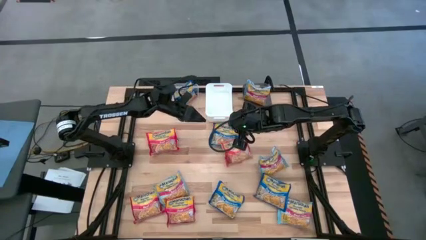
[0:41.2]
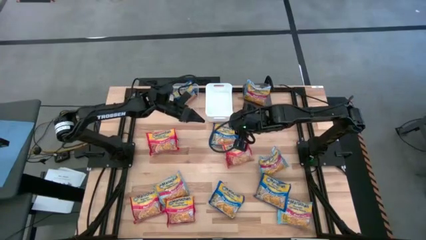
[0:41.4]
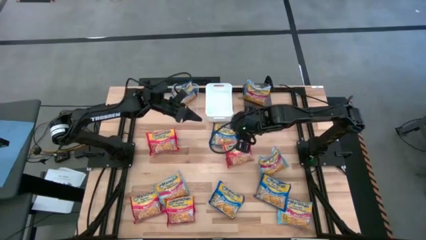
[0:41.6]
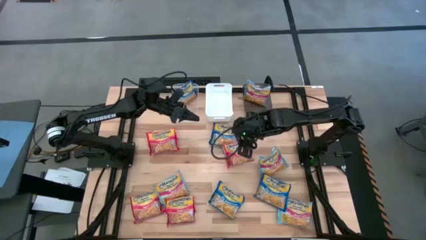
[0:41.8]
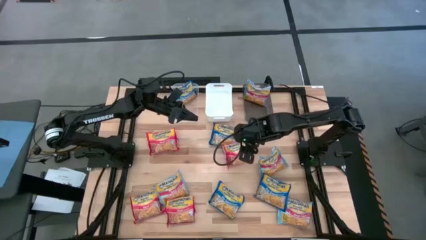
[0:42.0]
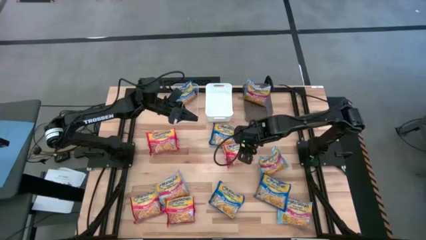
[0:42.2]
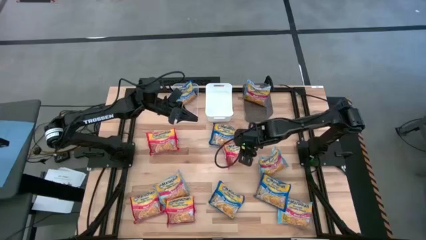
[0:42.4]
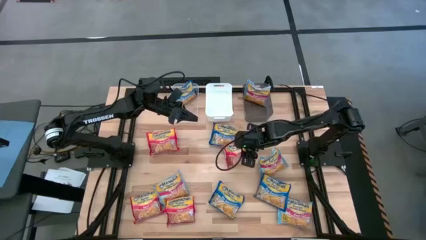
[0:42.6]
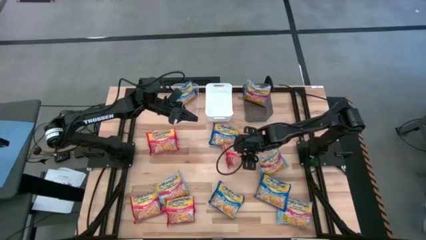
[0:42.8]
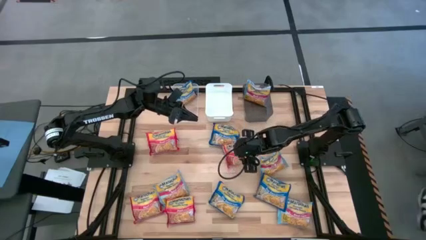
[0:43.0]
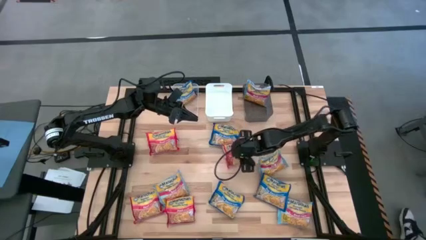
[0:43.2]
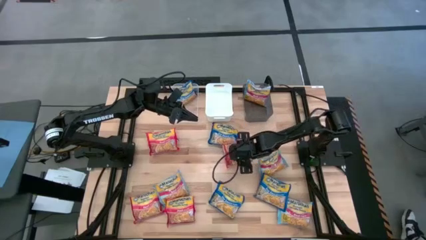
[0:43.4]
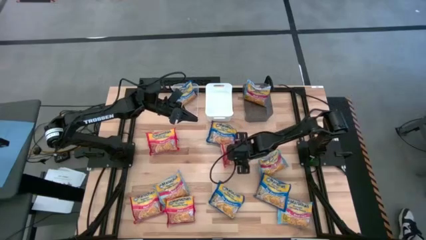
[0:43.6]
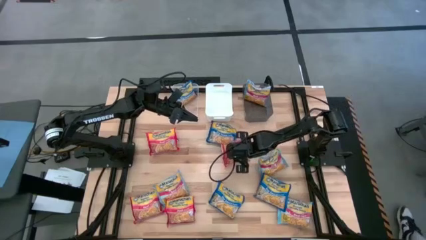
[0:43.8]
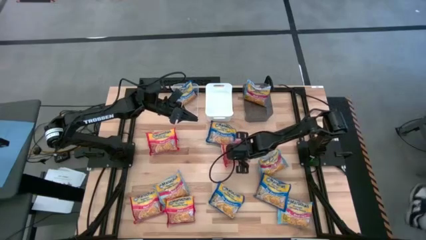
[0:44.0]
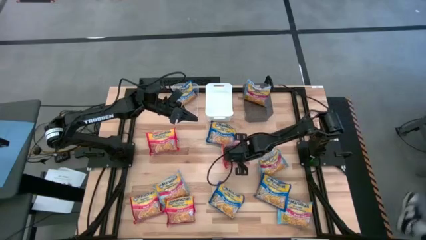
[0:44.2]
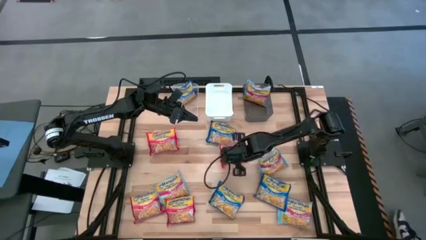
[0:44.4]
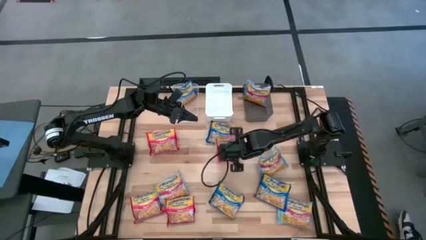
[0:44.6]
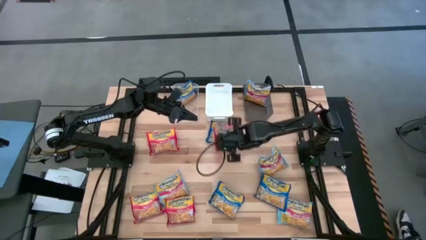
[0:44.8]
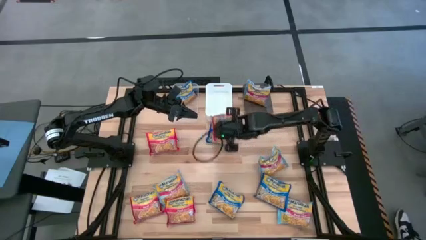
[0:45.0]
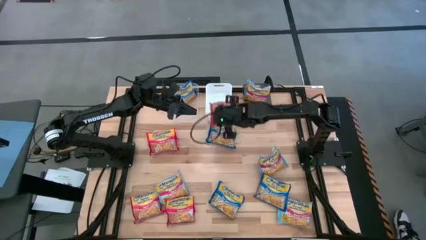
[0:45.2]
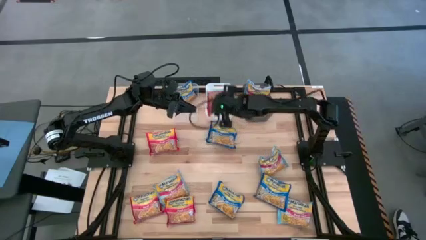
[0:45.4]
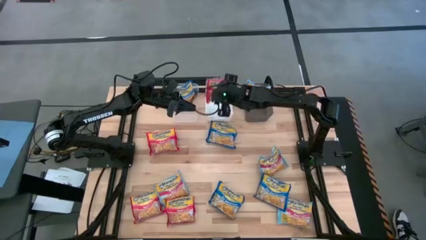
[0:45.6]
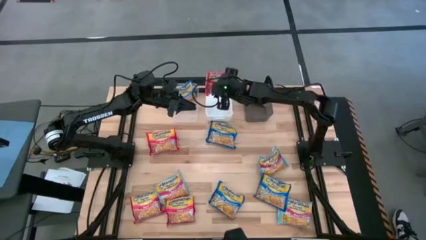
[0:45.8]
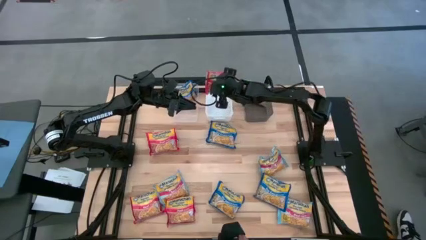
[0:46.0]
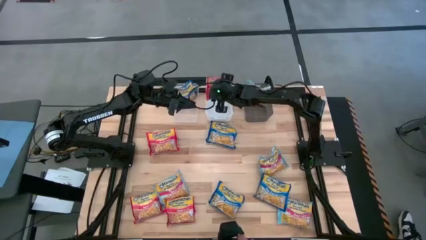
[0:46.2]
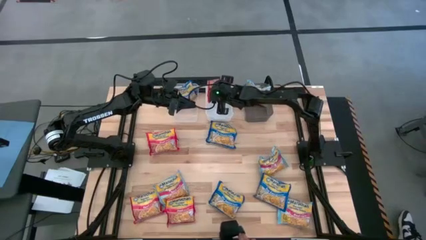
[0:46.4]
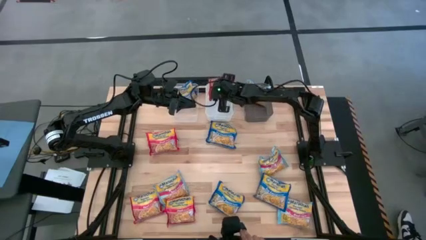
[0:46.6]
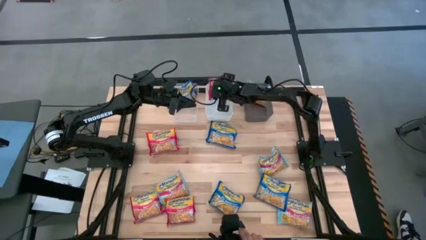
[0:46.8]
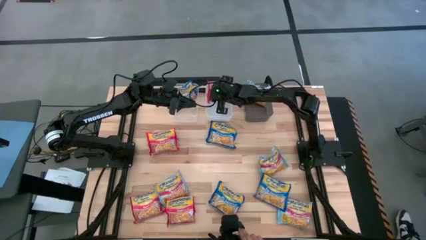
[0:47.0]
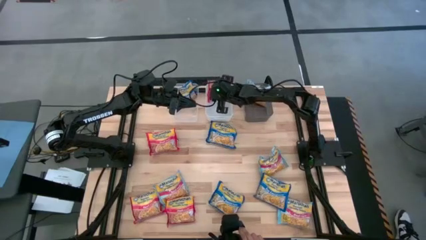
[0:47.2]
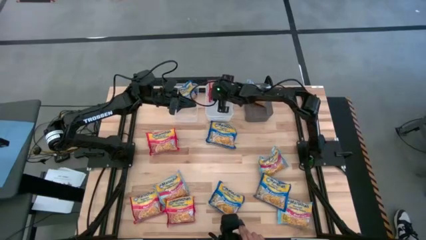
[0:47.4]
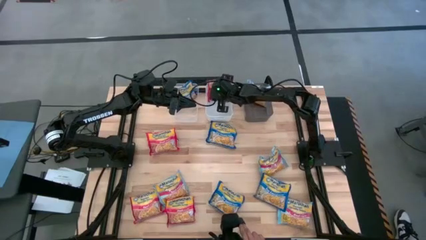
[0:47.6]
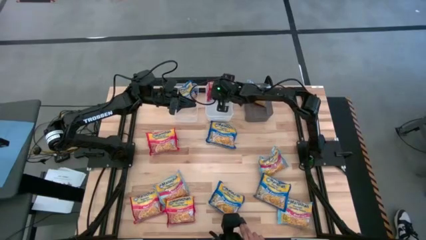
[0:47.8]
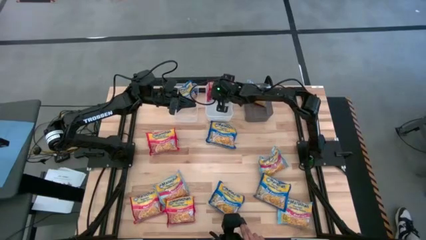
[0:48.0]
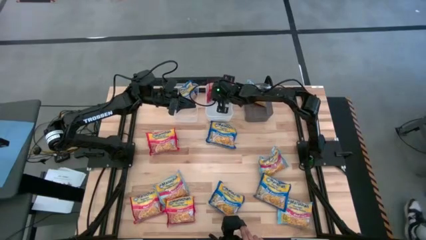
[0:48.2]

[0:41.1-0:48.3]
Task: Sort Maruchan noodles
Put the red noodle pack into the white bin

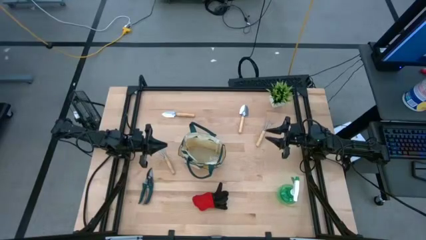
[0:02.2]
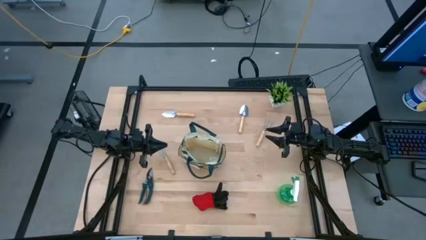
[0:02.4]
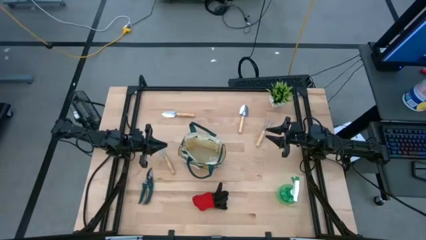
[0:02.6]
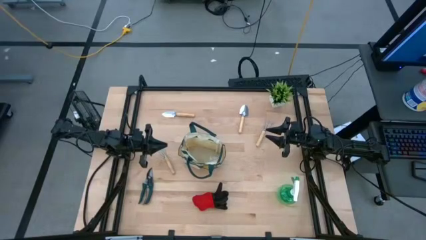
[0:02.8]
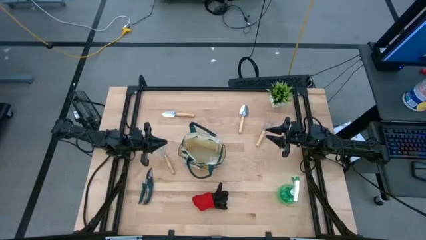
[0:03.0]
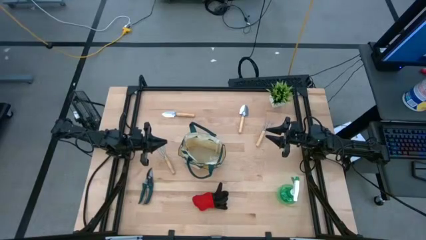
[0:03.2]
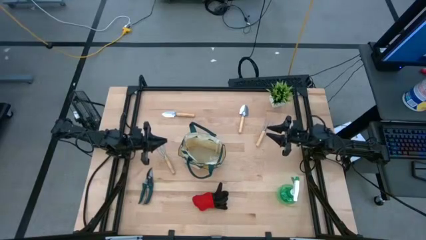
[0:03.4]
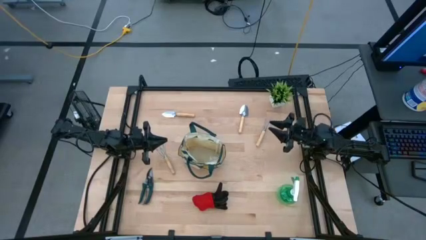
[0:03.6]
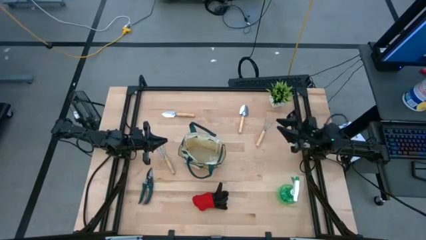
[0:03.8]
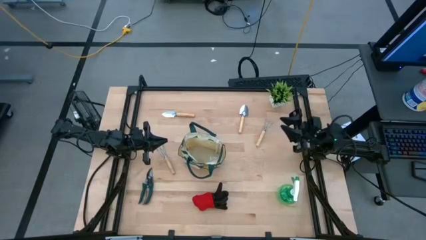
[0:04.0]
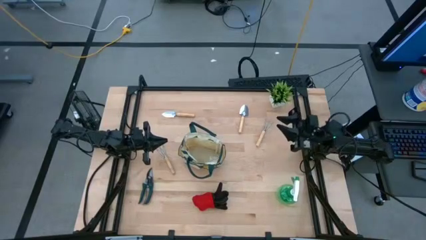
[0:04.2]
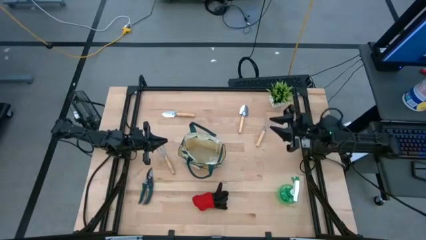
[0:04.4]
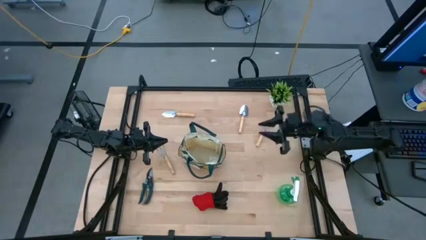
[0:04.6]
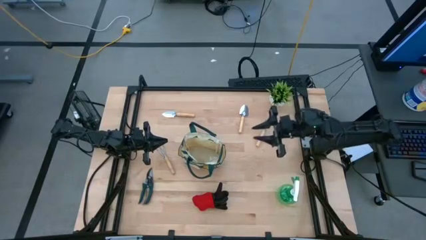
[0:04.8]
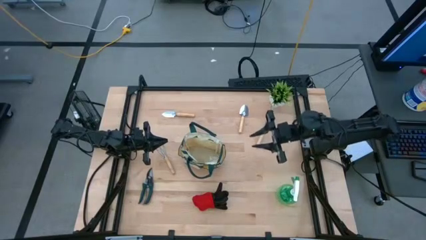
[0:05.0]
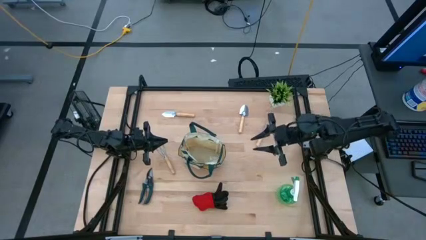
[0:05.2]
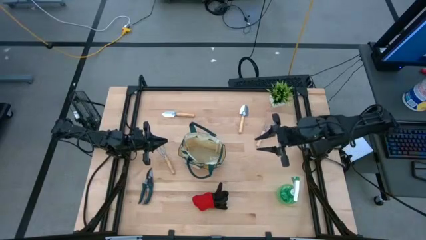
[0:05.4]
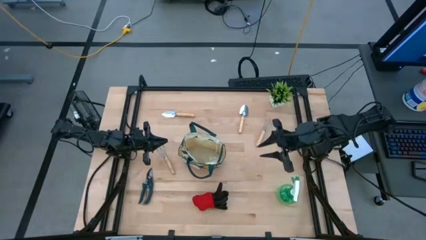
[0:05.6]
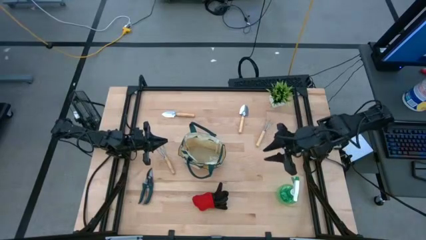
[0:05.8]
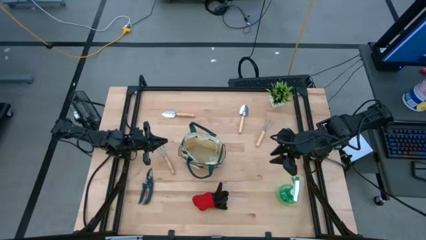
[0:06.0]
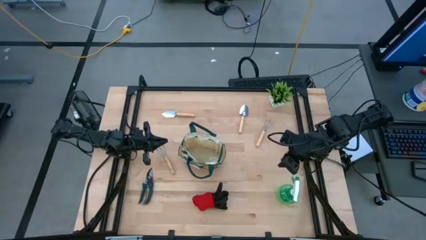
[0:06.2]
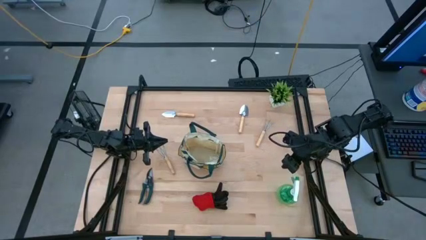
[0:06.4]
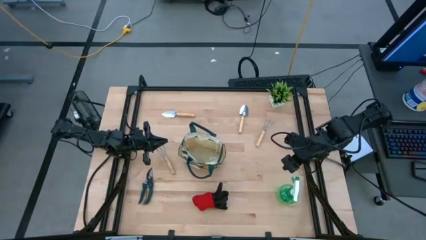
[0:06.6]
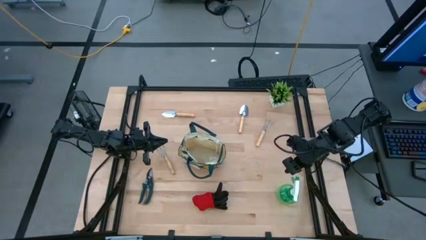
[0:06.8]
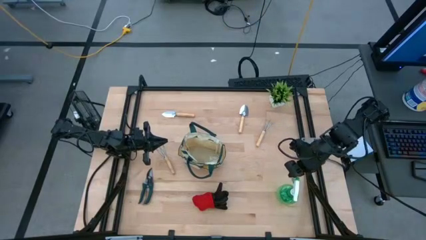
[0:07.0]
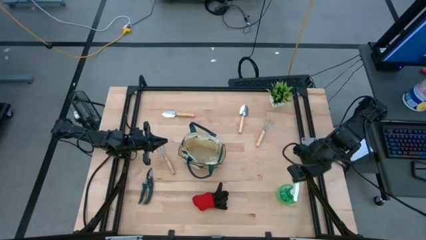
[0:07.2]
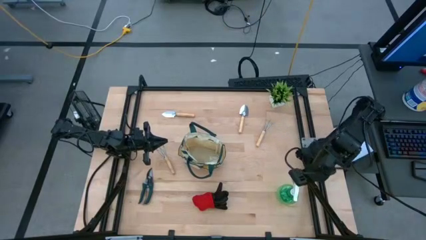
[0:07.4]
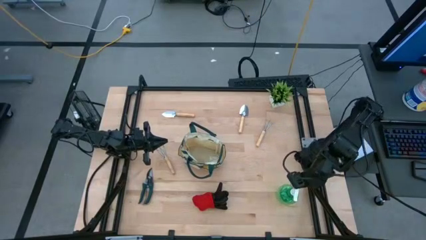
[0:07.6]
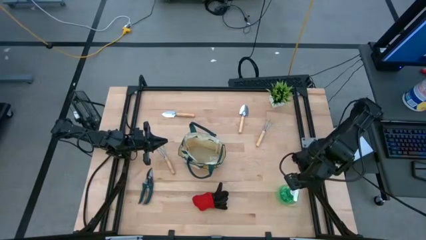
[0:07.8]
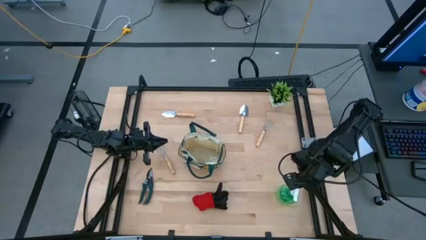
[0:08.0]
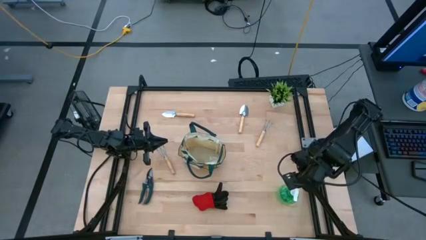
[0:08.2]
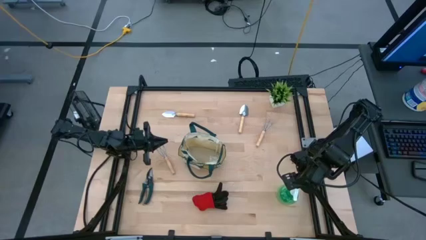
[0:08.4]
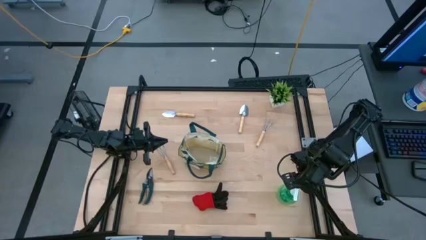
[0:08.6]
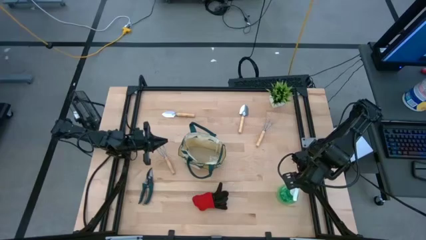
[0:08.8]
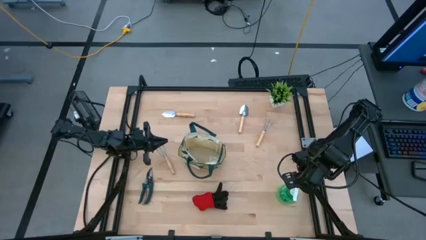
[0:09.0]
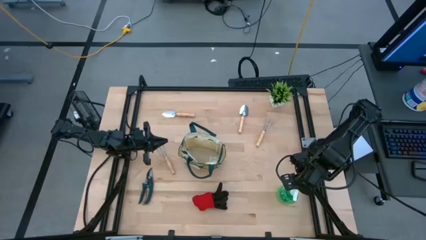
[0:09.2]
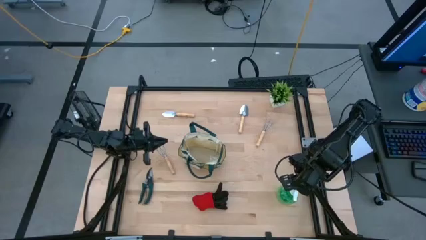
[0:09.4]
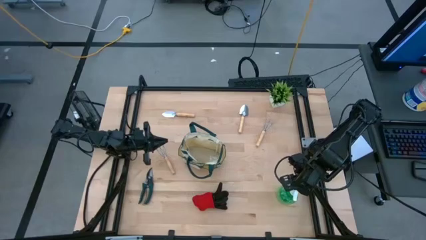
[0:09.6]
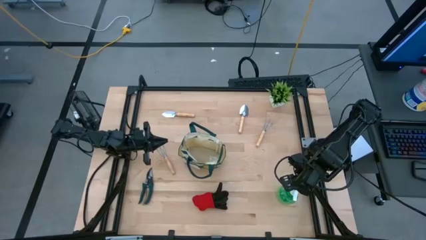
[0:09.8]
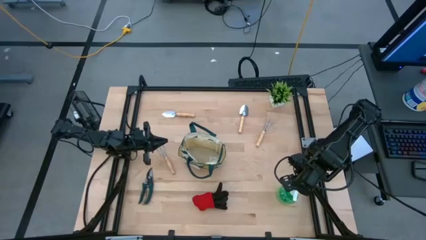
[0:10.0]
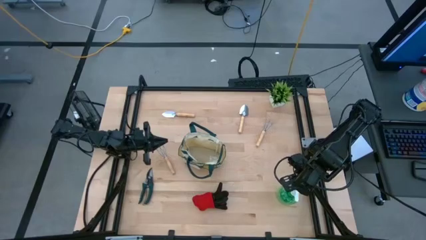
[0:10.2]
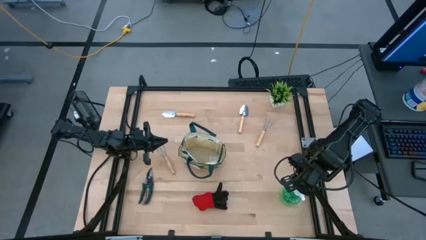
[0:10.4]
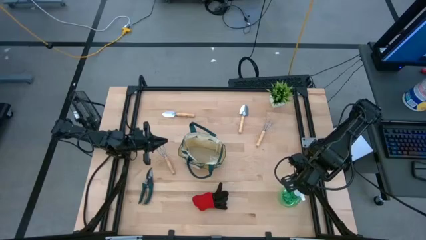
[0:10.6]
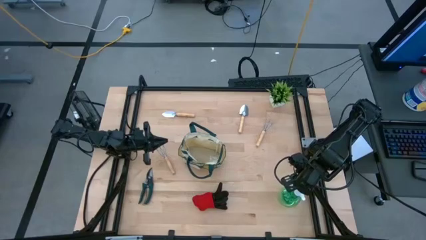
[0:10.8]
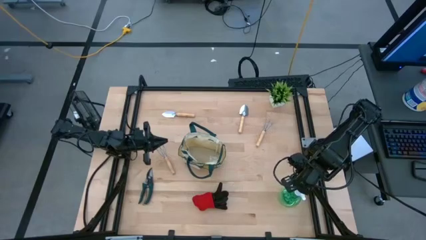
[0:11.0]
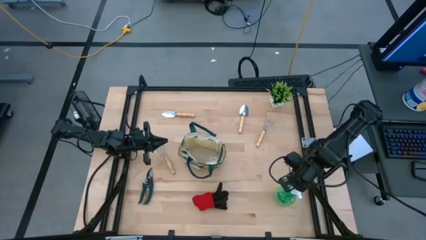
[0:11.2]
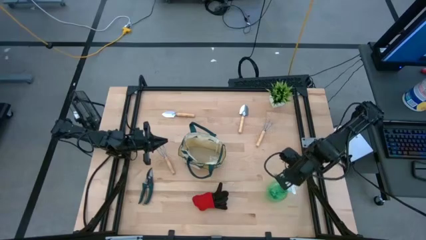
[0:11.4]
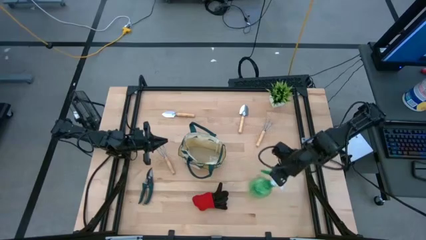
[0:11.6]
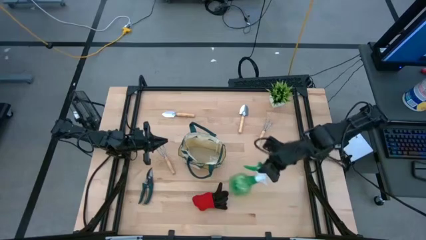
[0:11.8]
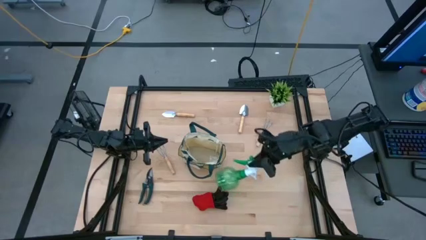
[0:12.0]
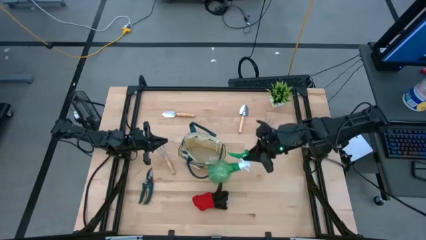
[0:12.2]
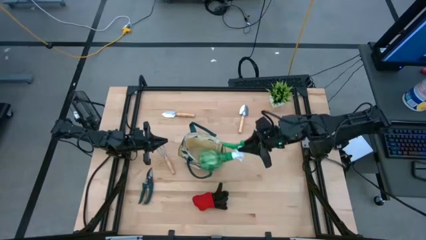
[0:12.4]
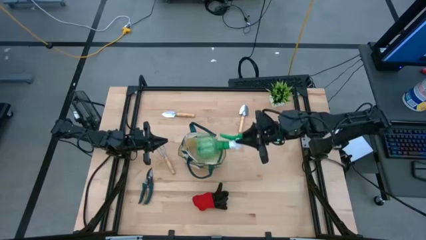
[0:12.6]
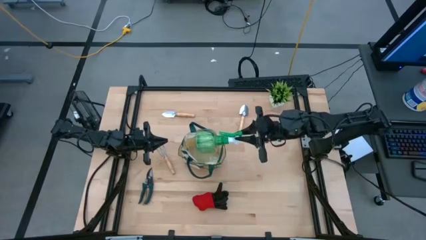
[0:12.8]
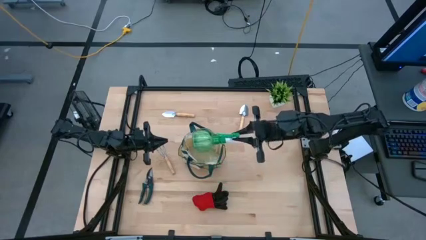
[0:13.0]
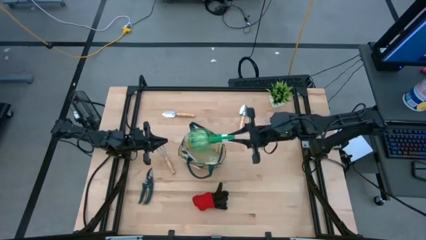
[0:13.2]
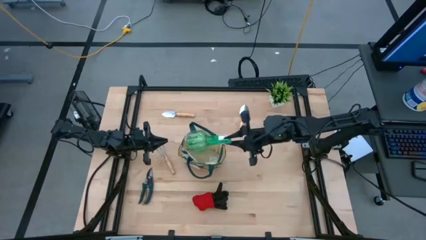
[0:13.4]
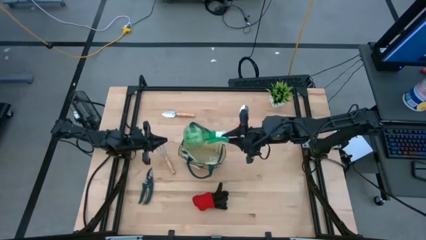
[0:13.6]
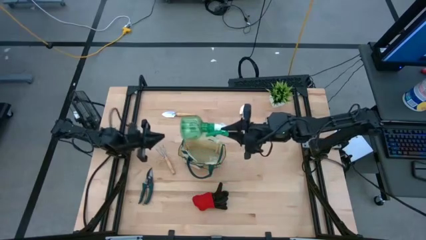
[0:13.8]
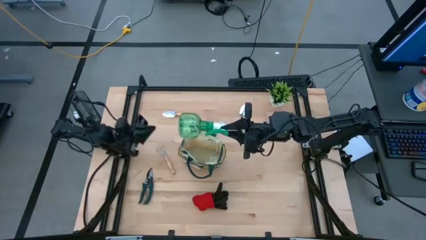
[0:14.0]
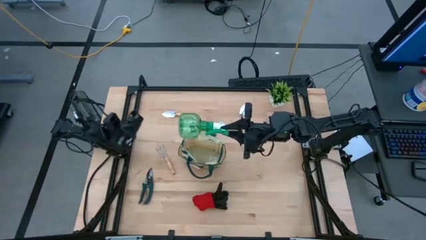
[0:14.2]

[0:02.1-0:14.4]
Task: Pick & Place Garden tools in Gardening bag
Put the green spray bottle into the brown gardening bag
